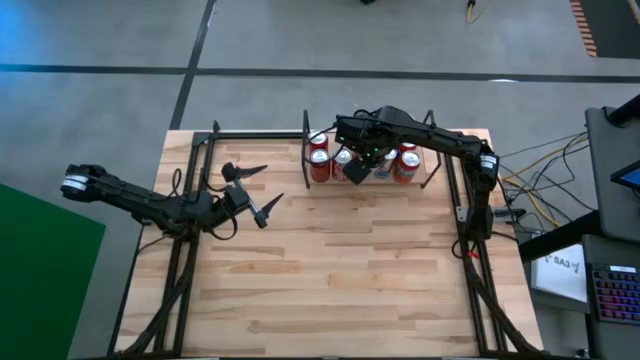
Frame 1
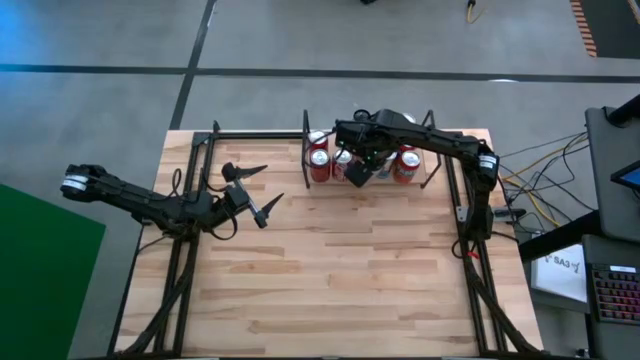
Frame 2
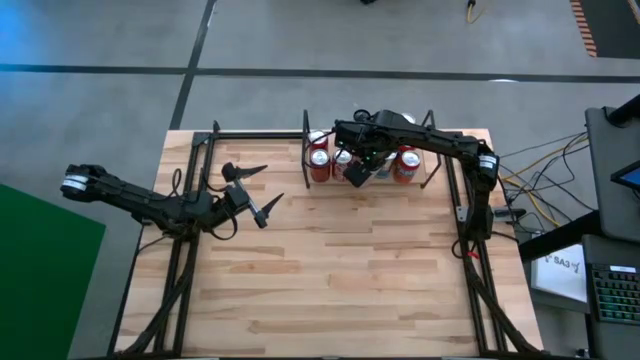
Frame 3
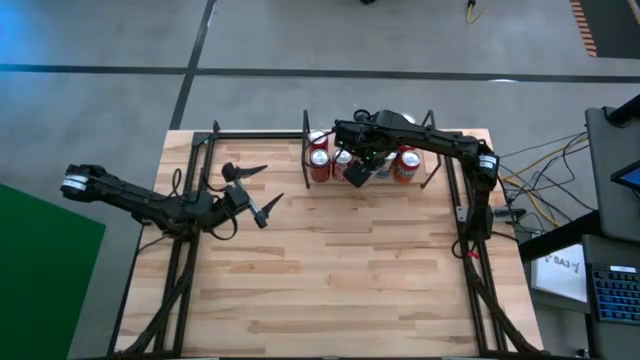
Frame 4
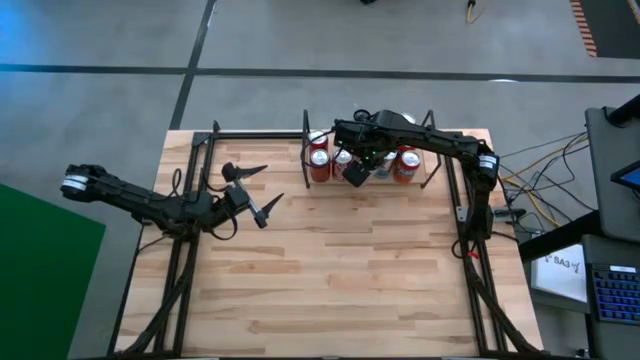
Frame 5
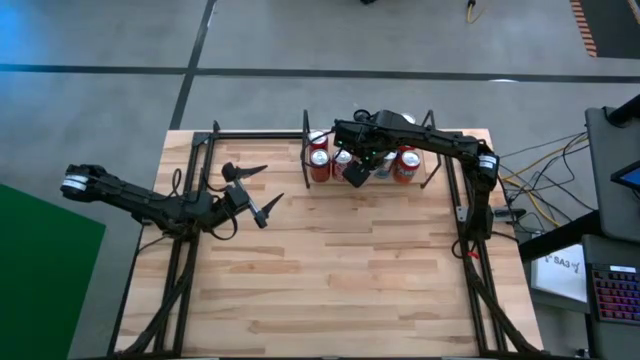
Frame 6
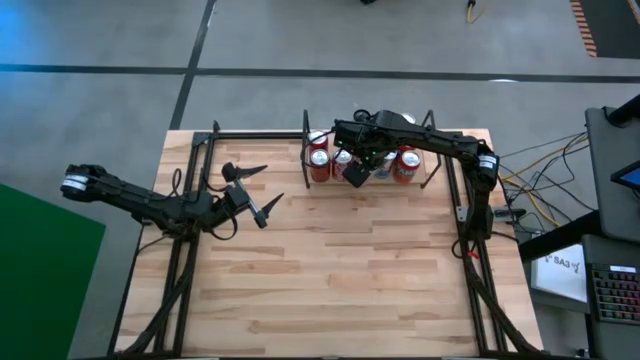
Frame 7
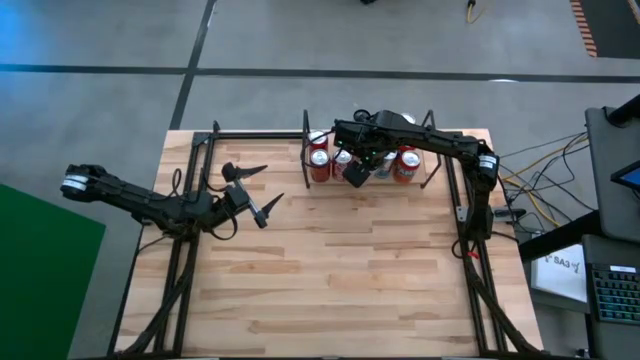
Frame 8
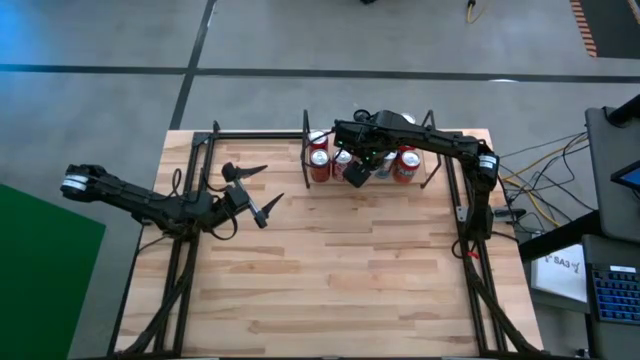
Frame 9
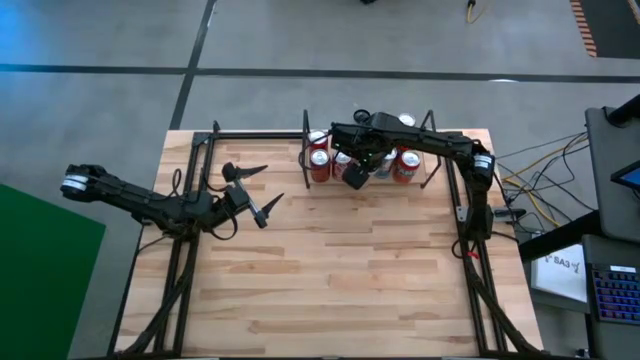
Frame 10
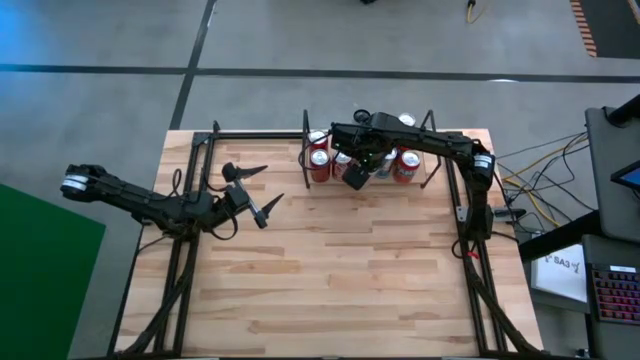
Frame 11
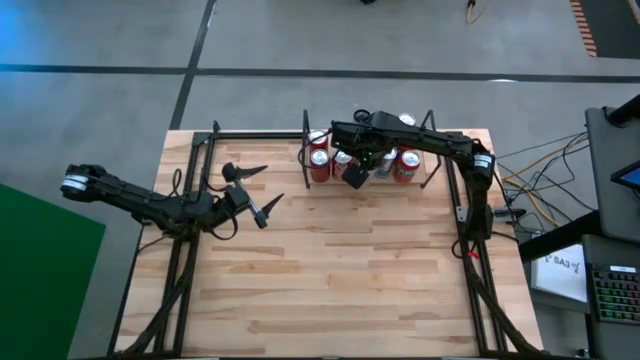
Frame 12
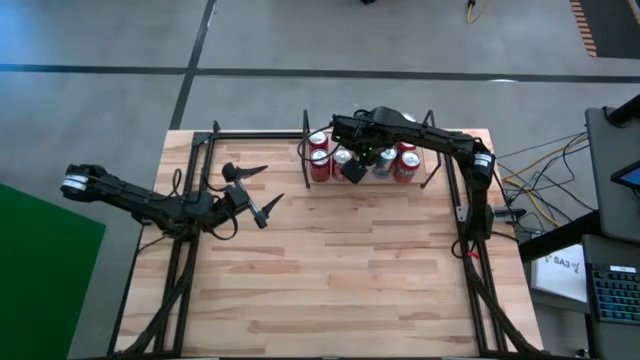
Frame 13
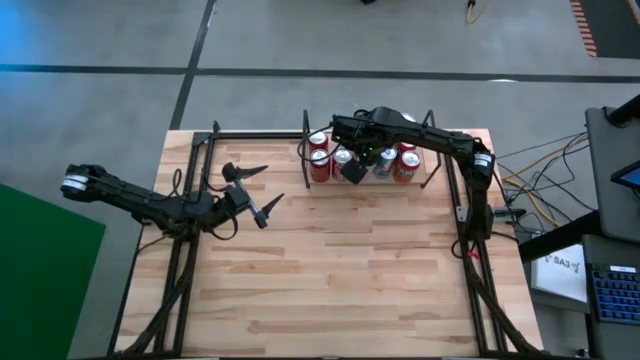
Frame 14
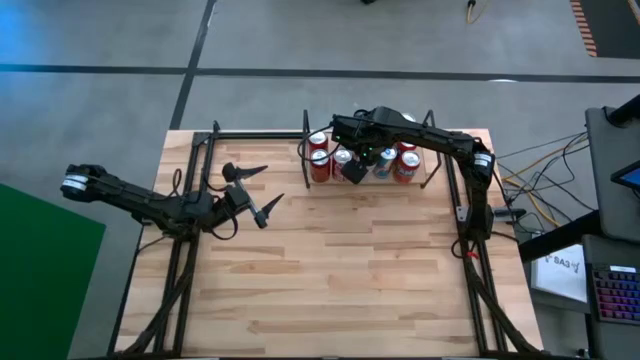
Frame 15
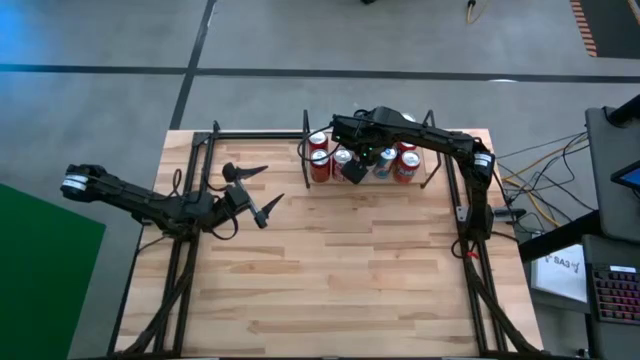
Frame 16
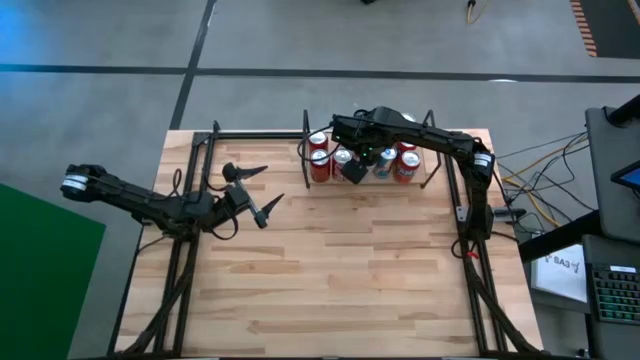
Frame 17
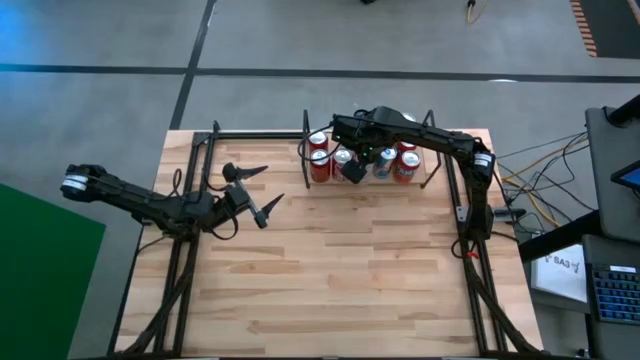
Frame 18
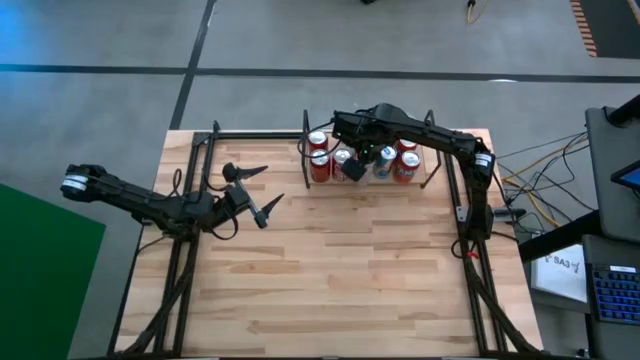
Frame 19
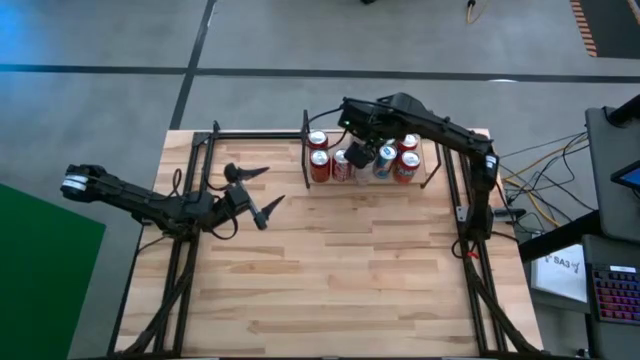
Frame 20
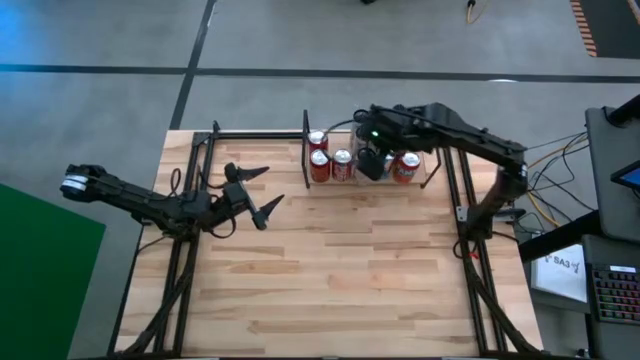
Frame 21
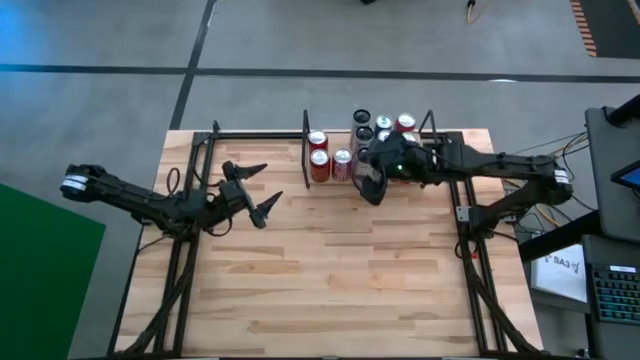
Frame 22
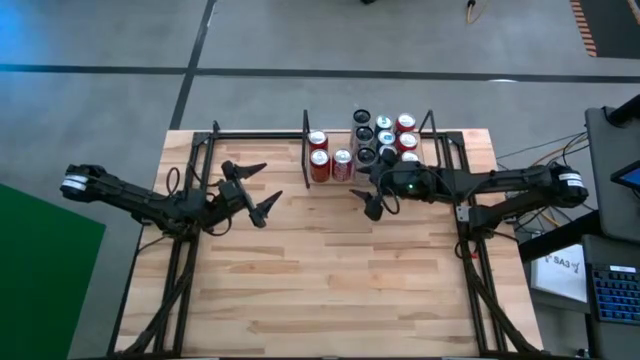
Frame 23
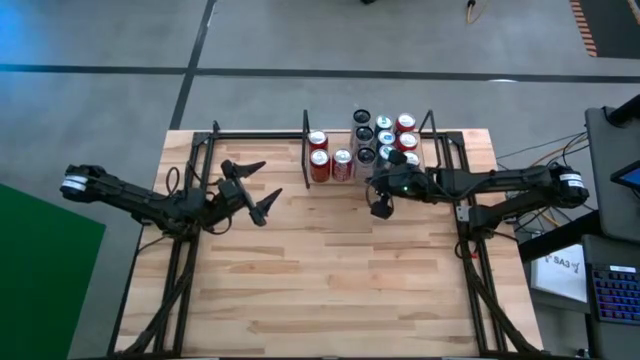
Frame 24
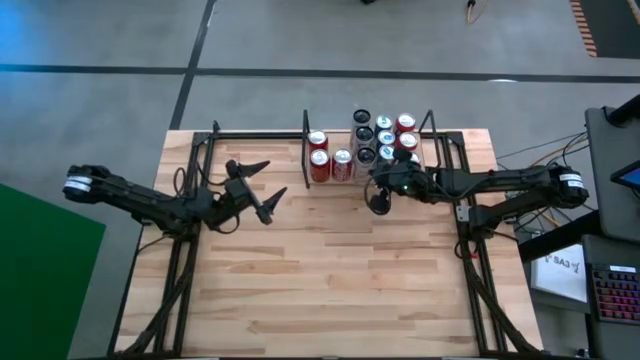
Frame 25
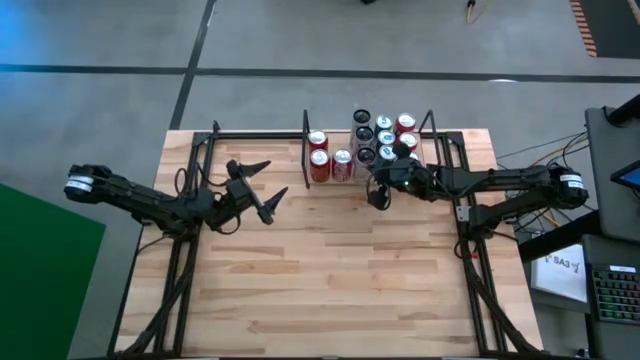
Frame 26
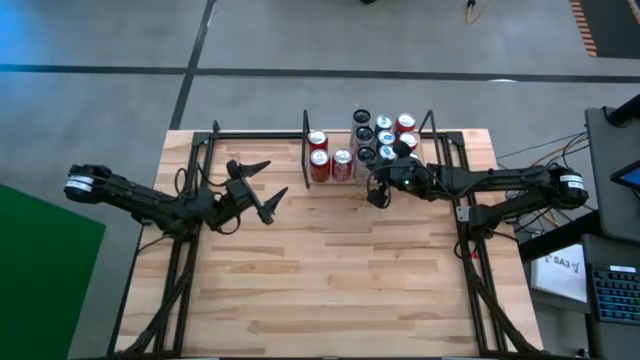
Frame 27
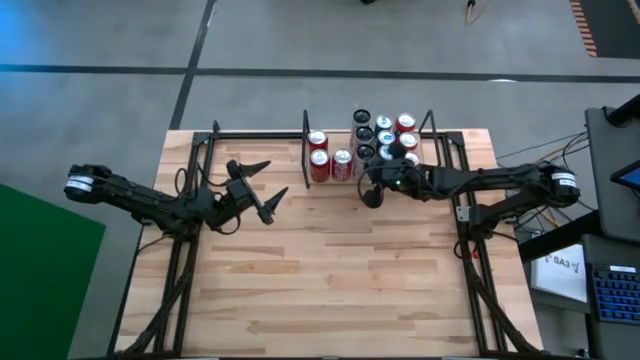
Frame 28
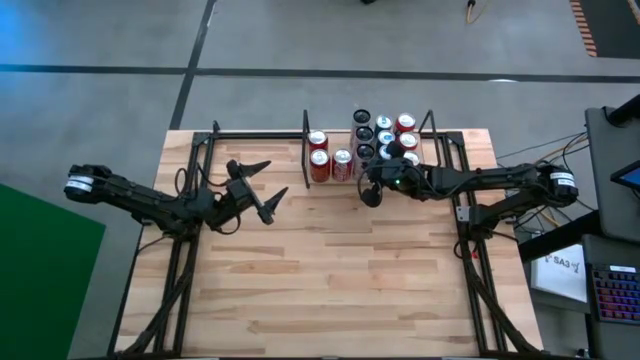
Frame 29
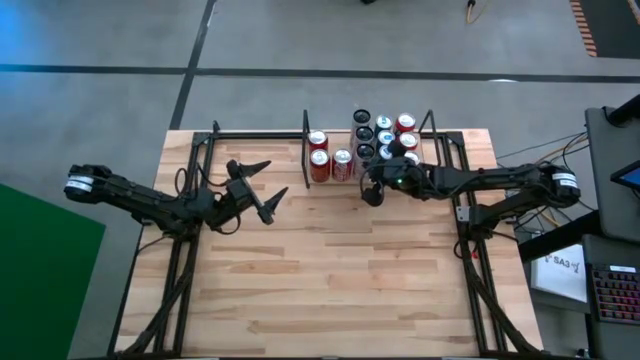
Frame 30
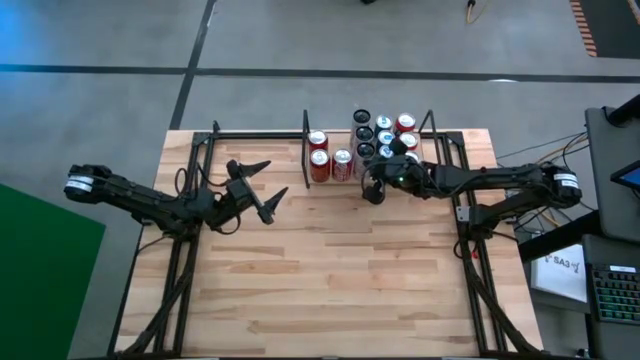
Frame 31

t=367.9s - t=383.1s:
Task: Place canned beverage on shelf
Put the white and pink soda can on the shelf

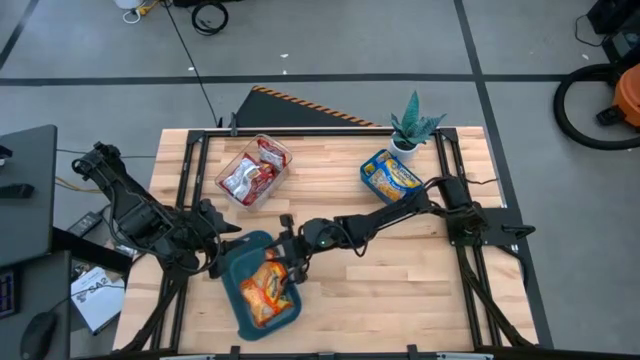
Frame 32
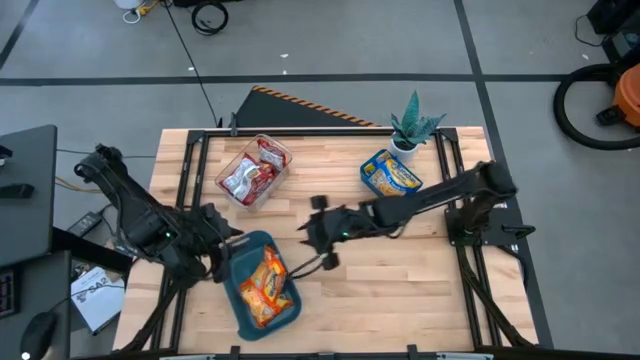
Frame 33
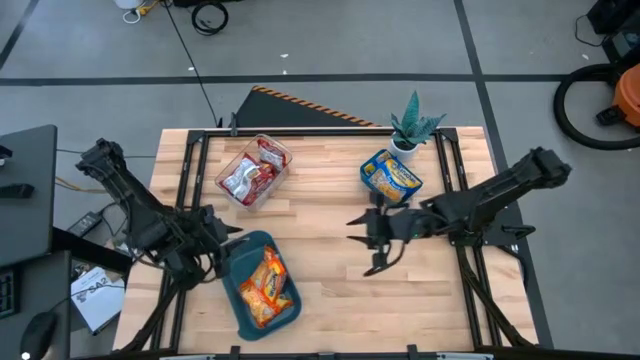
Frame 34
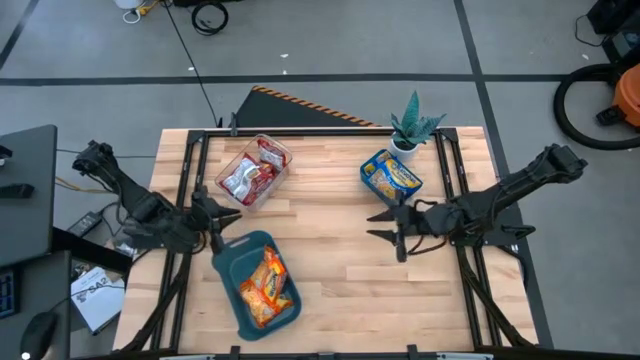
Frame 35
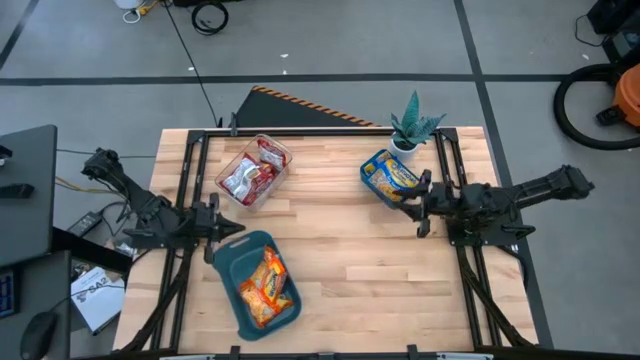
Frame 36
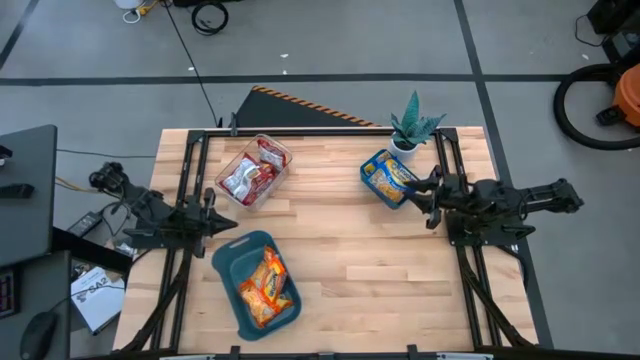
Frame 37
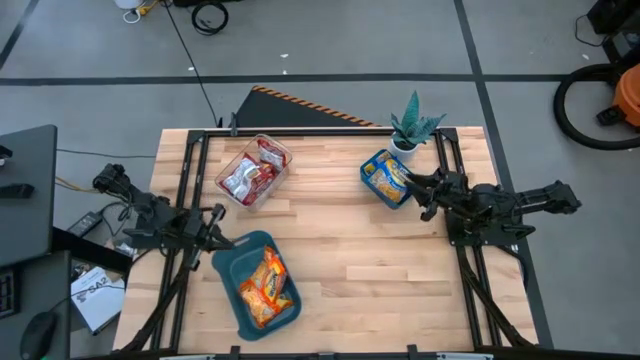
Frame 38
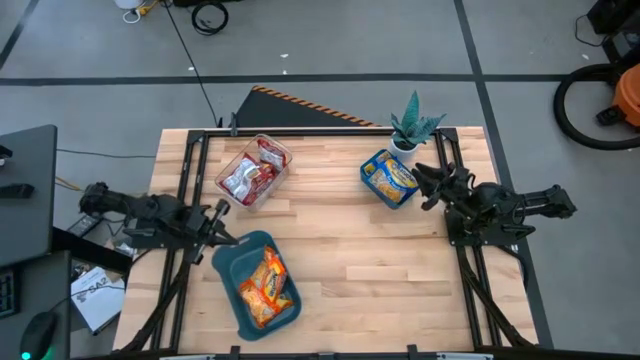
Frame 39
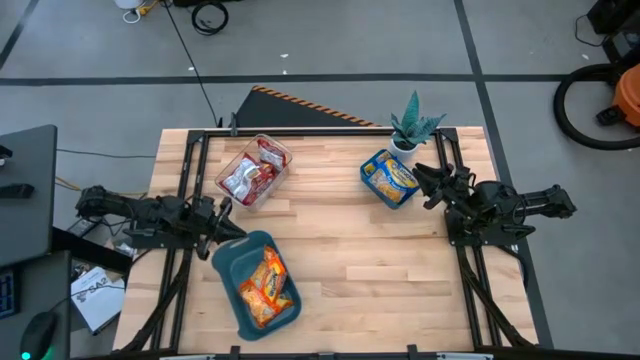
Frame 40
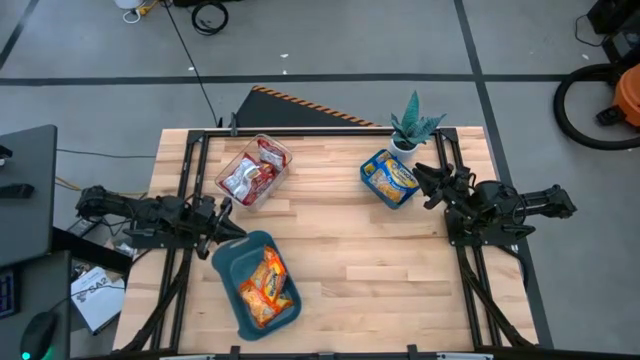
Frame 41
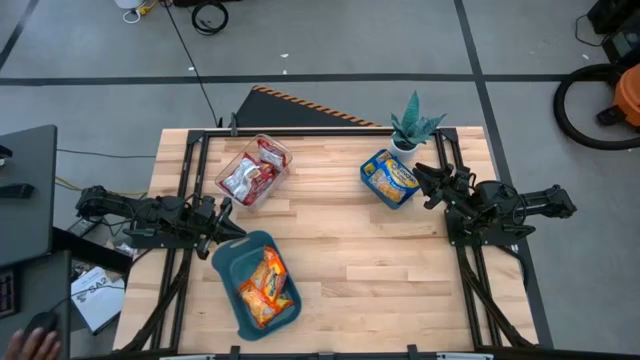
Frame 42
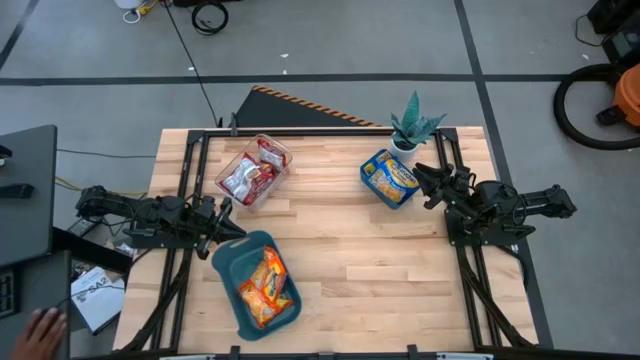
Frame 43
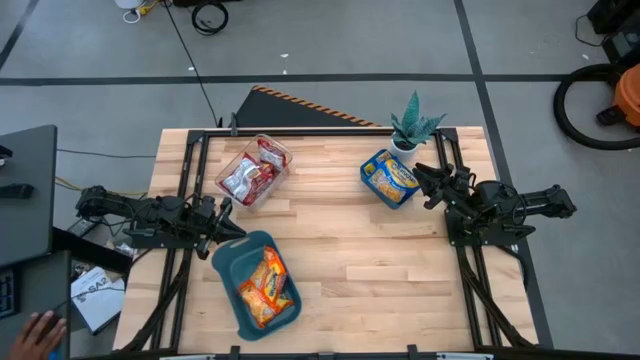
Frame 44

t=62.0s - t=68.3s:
Task: Sort Maruchan noodles
Return to Home Position
